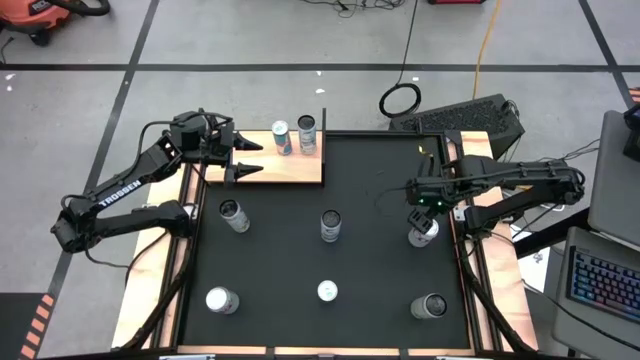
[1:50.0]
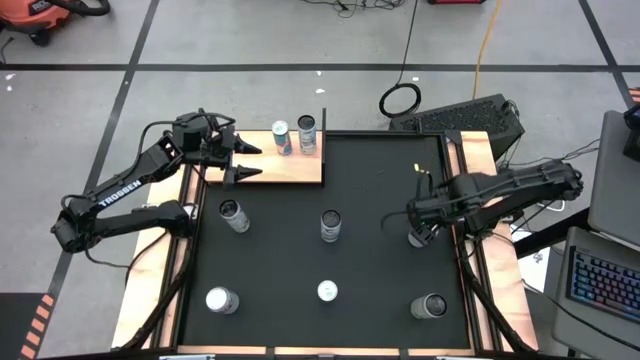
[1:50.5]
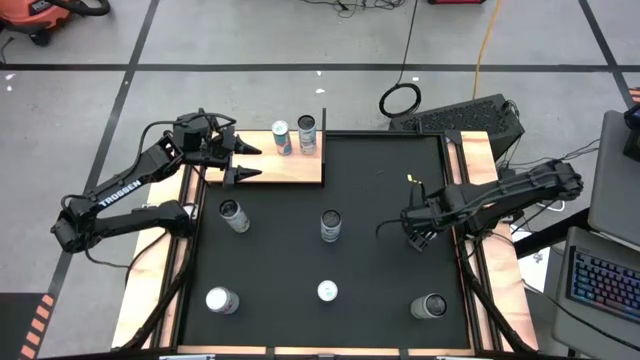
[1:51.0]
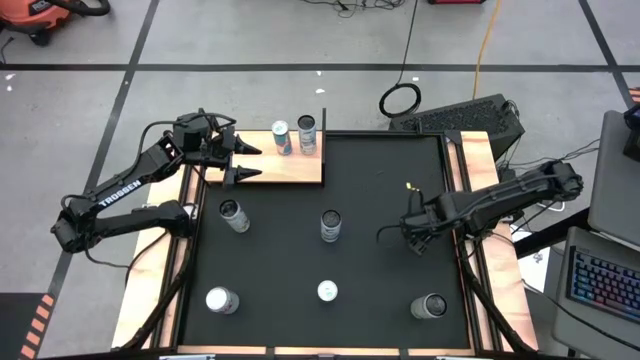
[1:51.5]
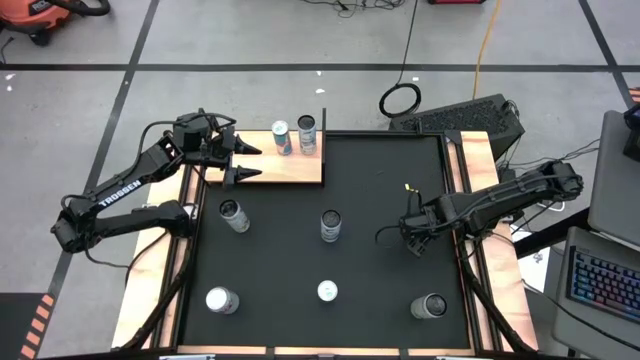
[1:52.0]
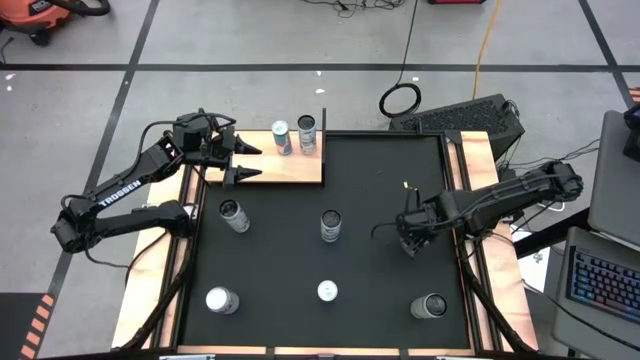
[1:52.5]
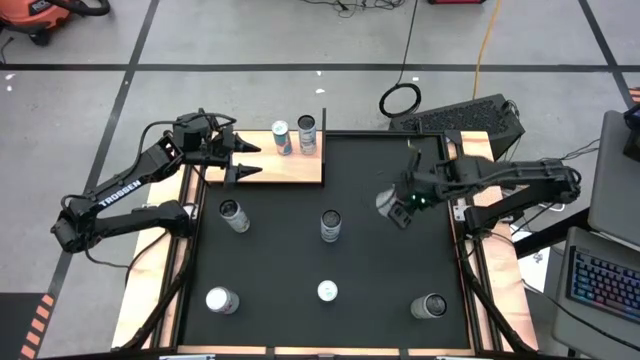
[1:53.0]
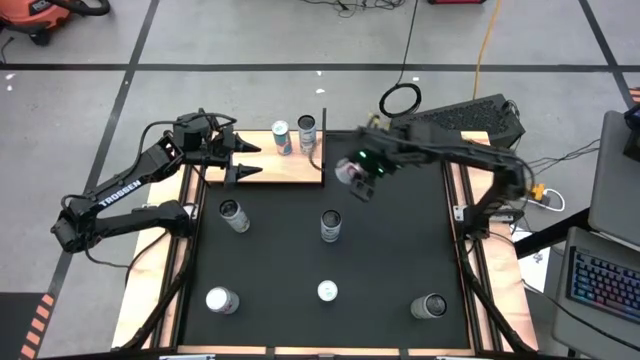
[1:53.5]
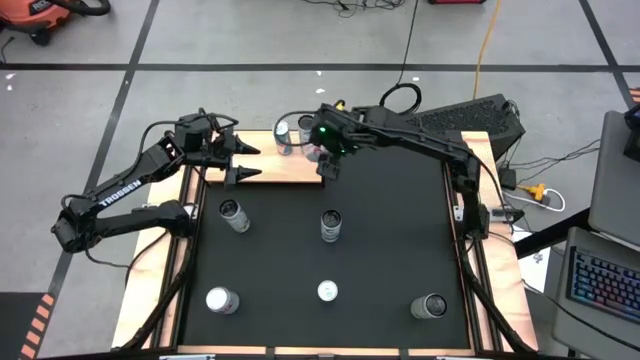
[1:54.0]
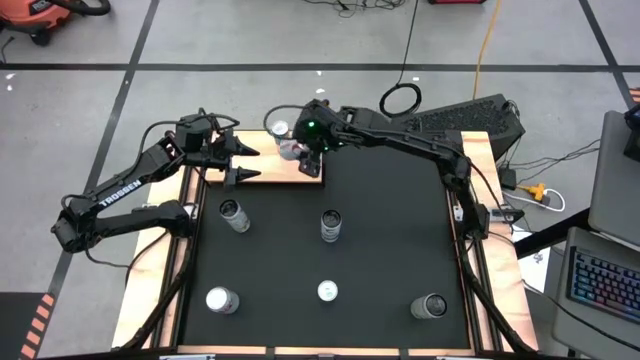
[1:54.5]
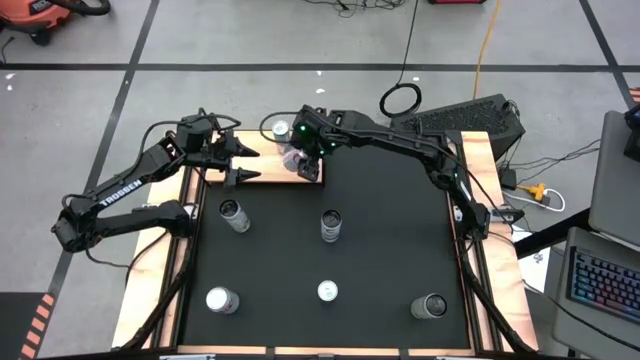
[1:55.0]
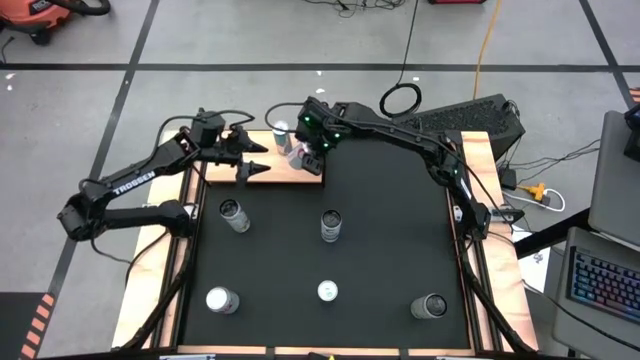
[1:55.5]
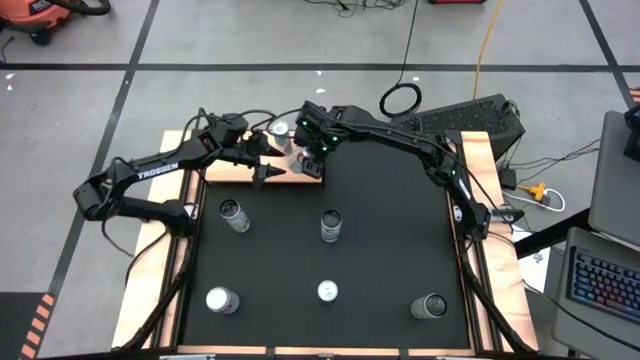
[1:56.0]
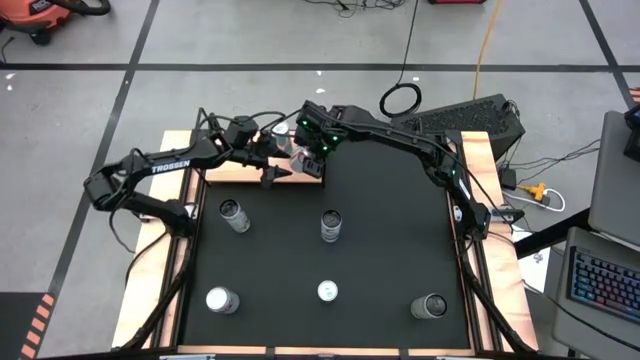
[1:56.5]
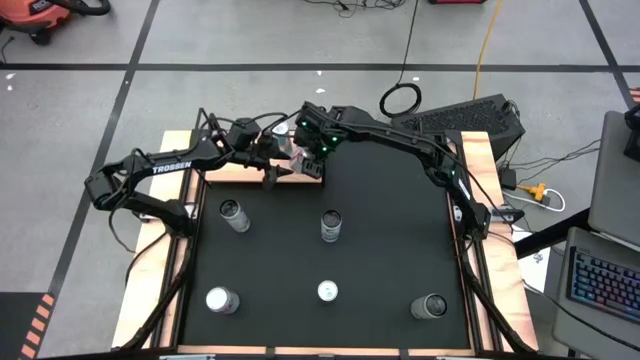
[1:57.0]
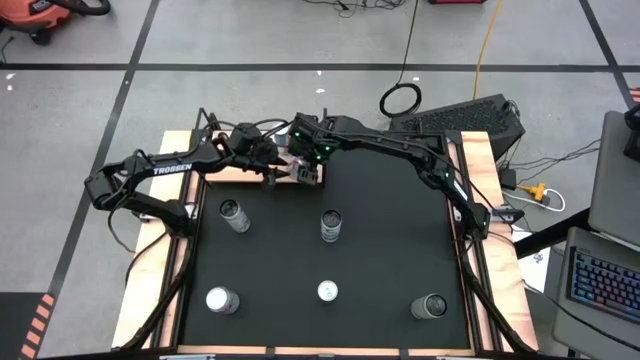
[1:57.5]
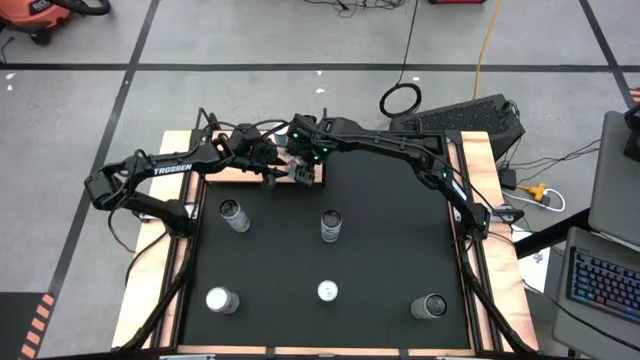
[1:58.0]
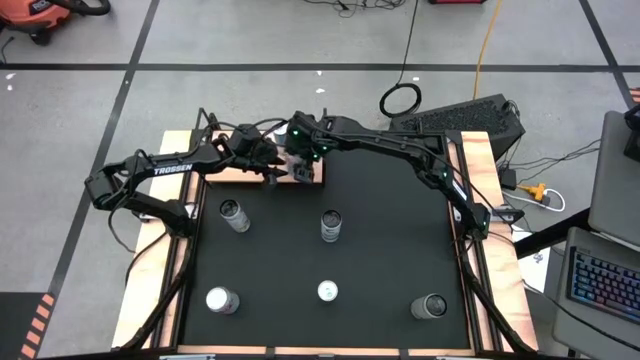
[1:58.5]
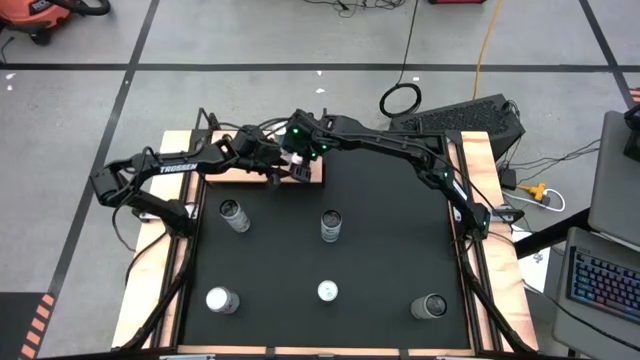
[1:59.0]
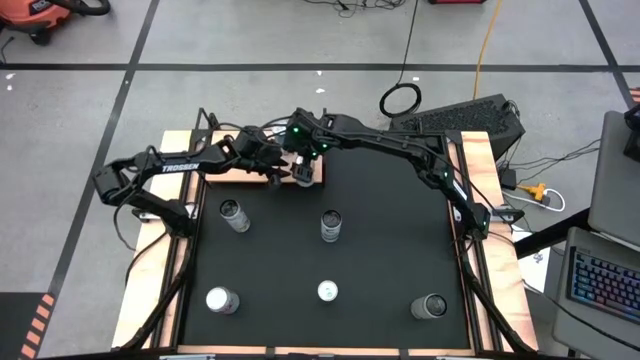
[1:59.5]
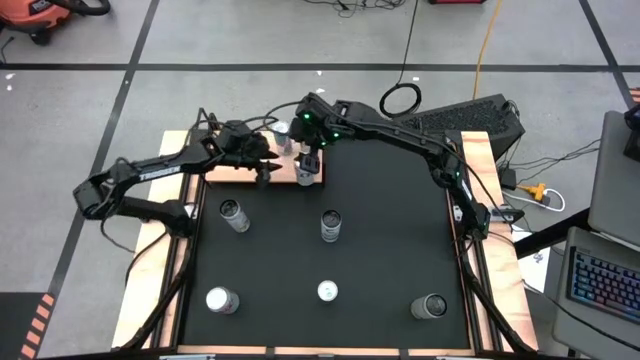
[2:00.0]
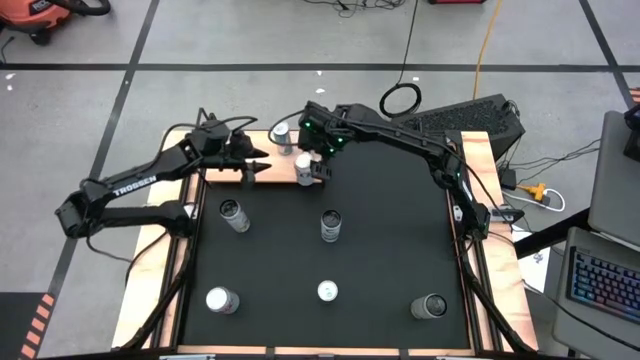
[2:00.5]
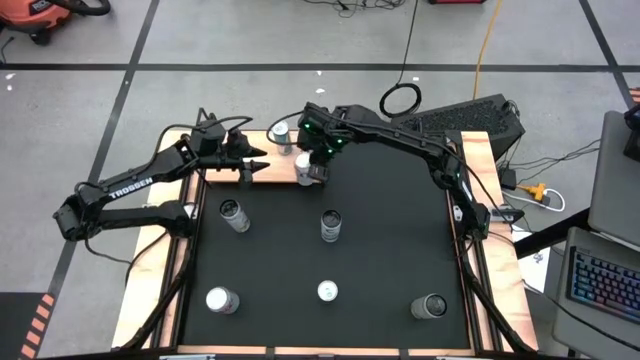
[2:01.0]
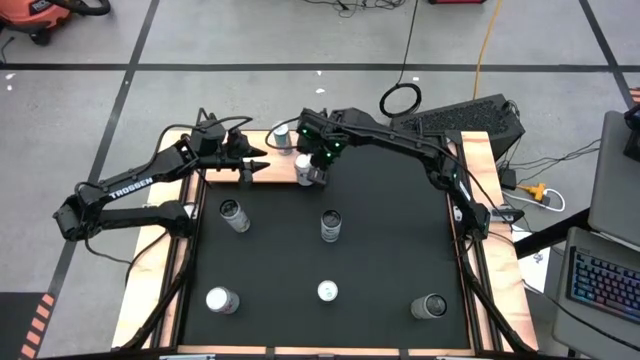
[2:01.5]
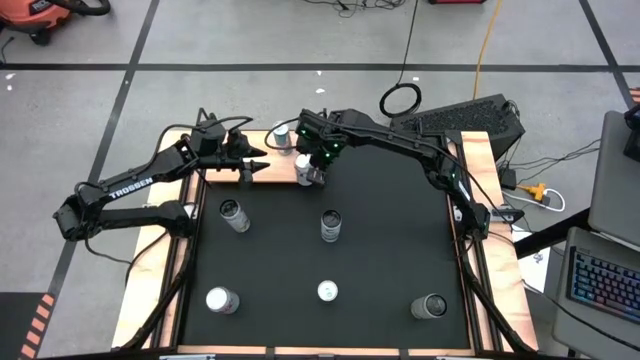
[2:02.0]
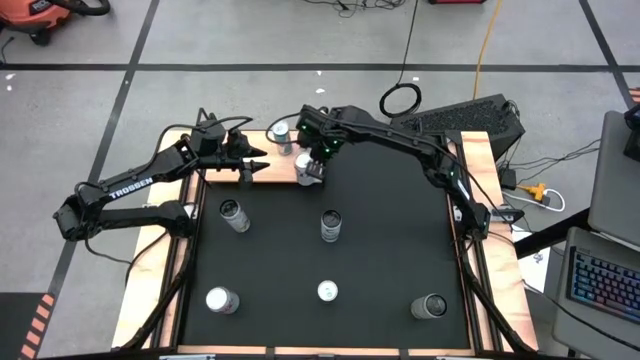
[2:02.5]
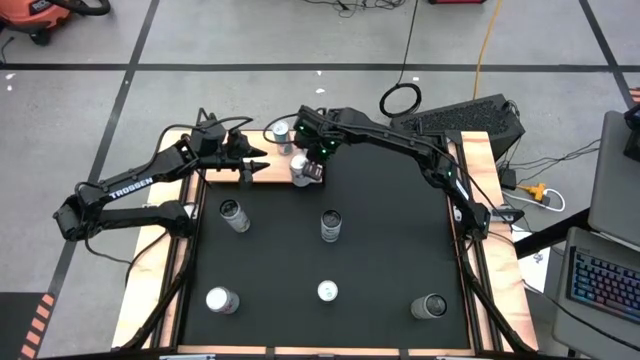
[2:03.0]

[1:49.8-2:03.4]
Task: Place canned beverage on shelf
Put the top red-silver soda can on the shelf

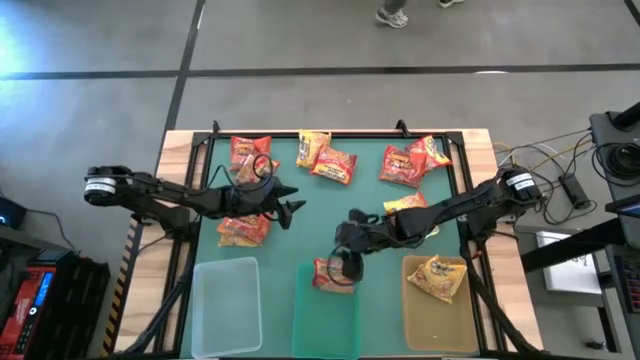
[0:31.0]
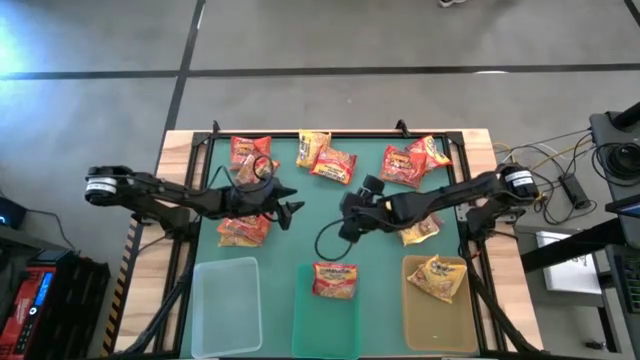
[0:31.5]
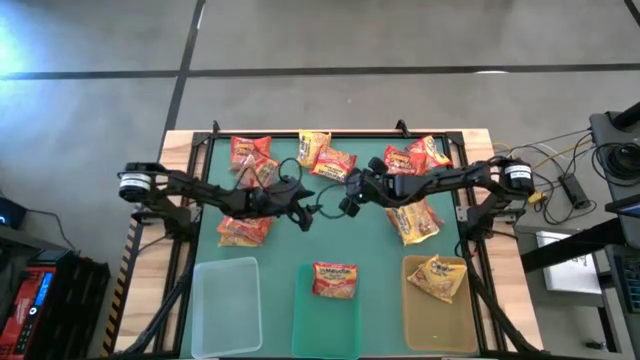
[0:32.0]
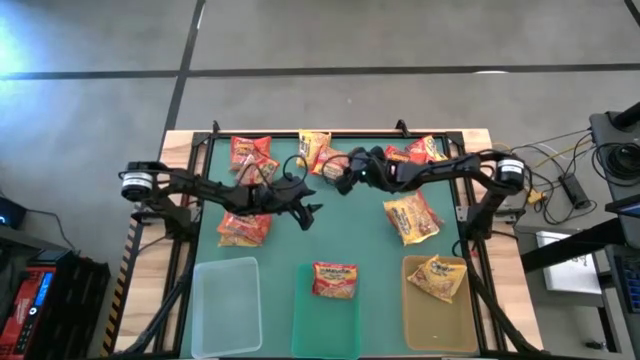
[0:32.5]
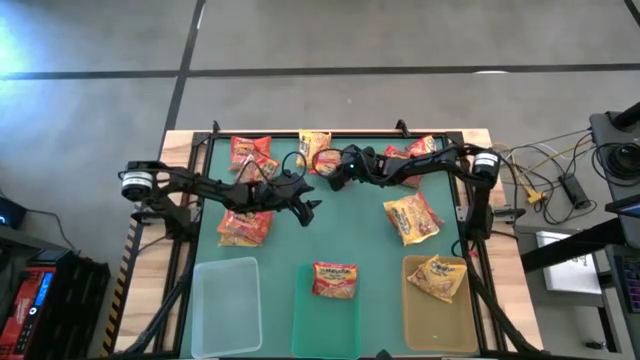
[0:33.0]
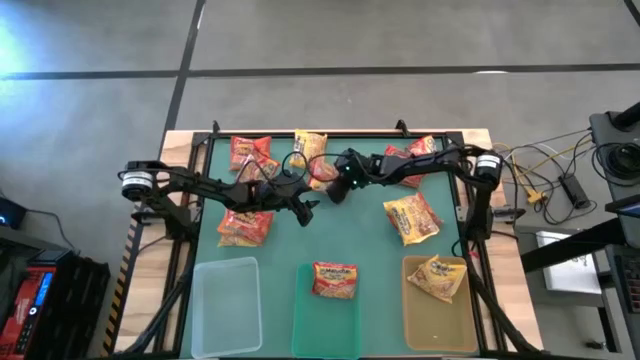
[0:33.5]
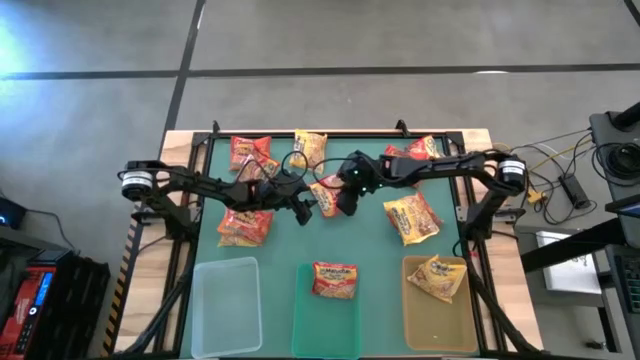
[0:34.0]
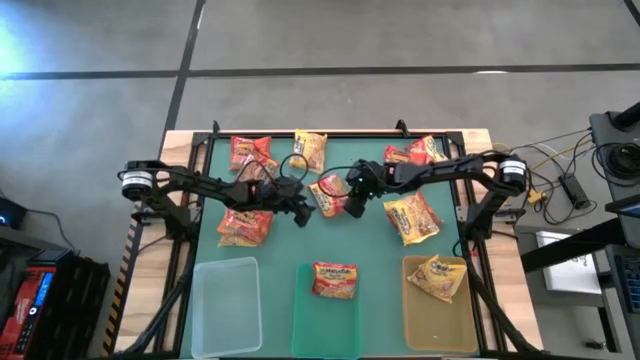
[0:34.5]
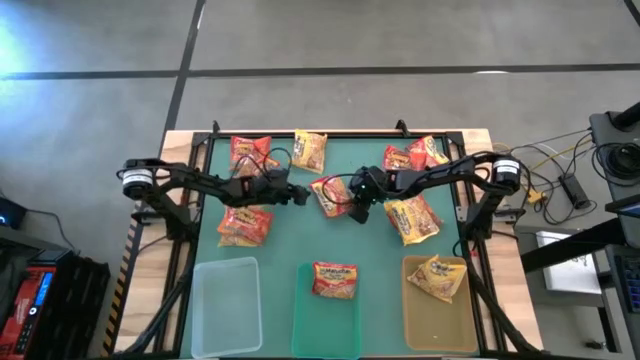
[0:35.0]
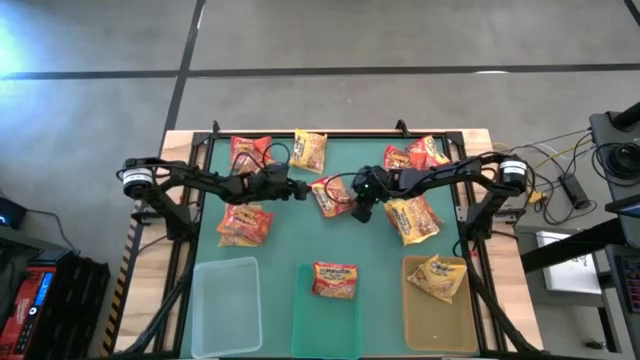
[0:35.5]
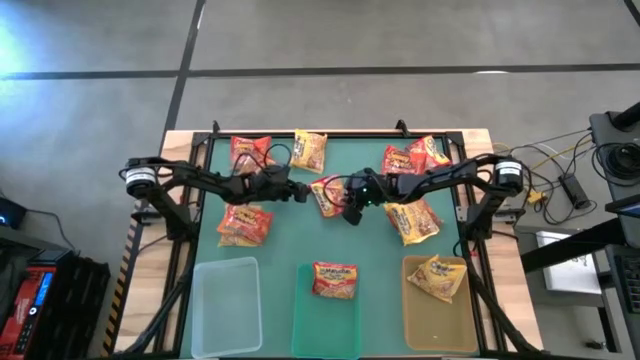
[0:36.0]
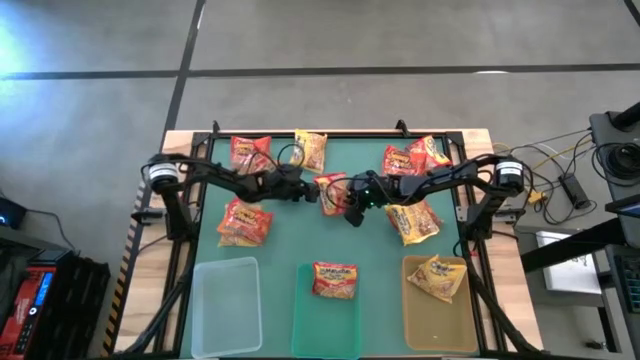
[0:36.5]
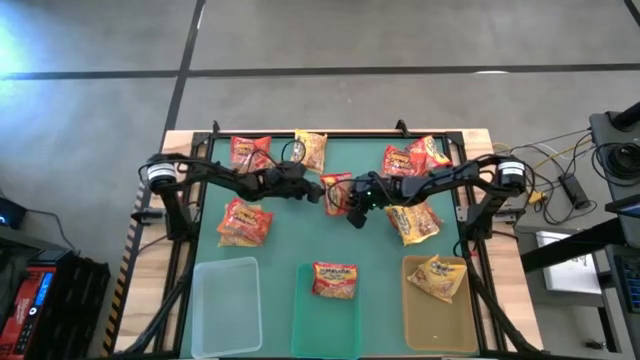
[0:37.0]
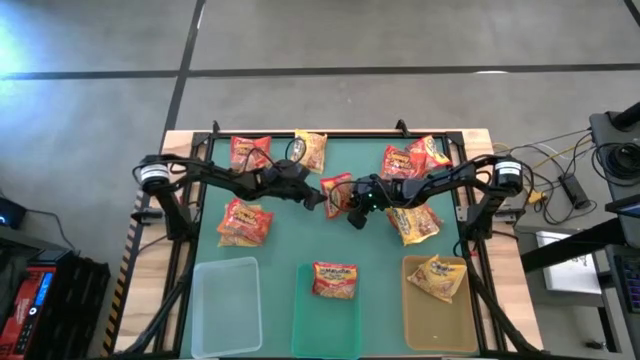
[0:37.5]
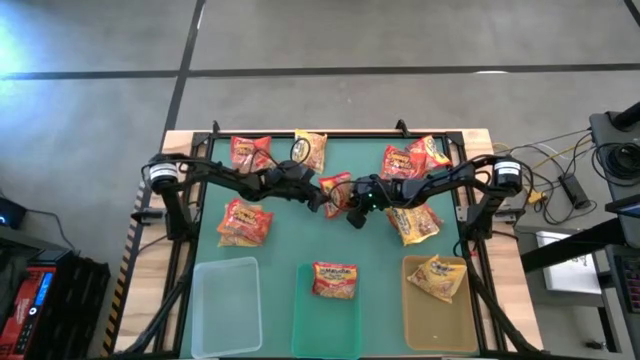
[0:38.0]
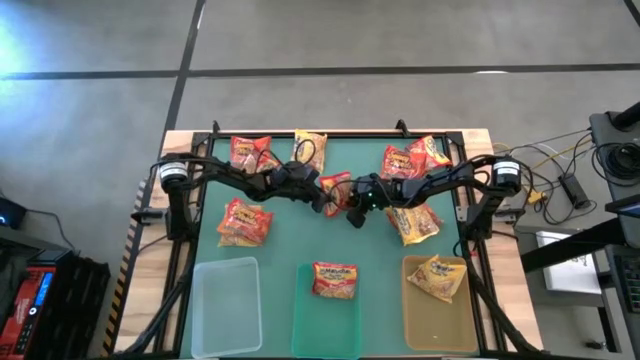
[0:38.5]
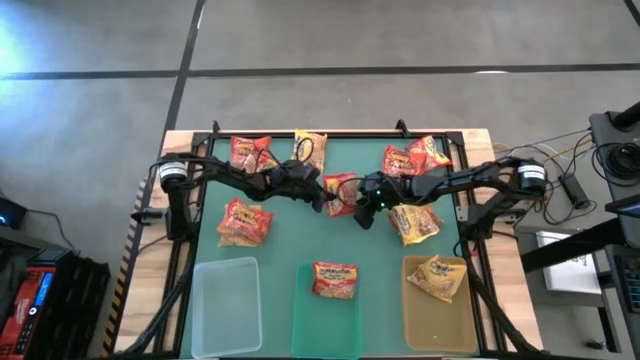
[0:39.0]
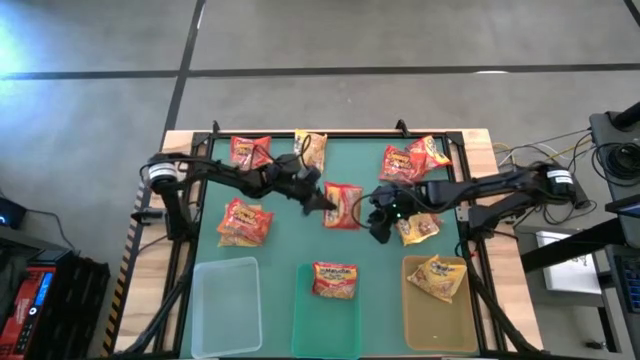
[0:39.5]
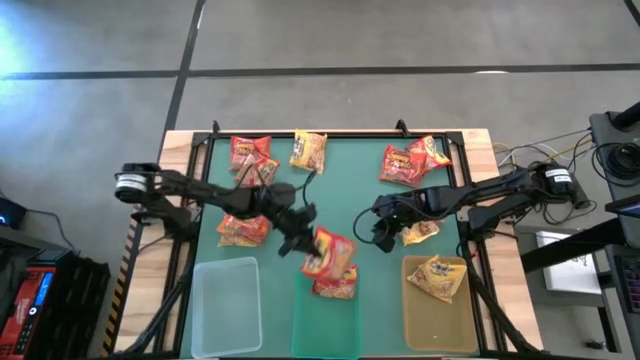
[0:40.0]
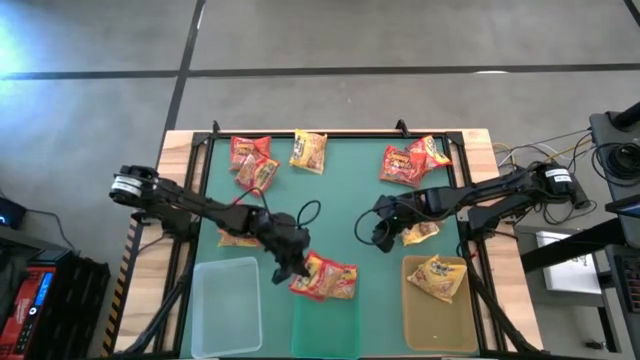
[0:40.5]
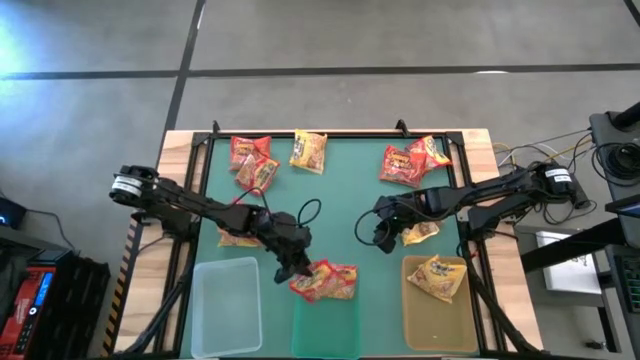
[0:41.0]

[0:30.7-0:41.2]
Task: Sort Maruchan noodles
Put the red noodle pack into the green bin
